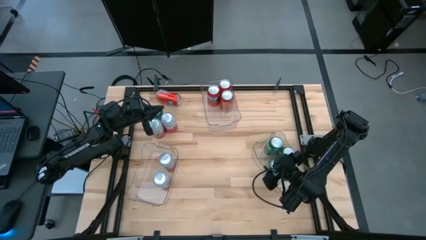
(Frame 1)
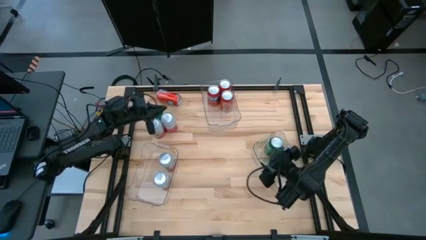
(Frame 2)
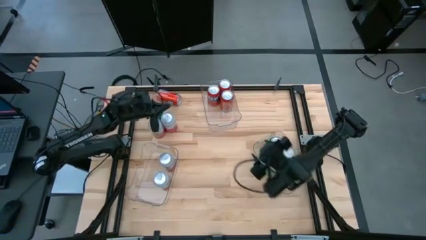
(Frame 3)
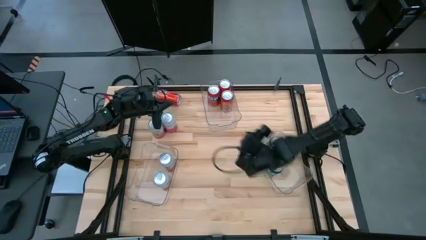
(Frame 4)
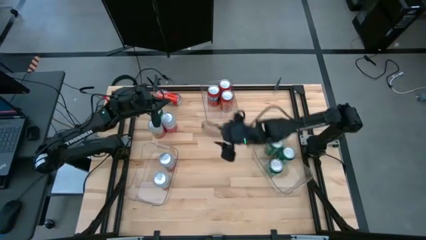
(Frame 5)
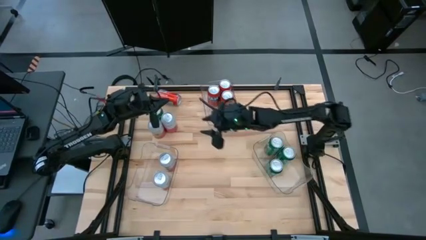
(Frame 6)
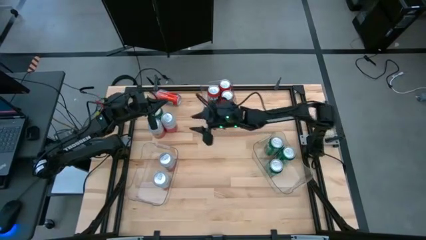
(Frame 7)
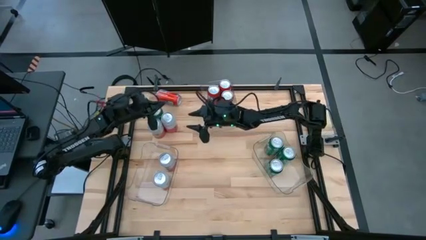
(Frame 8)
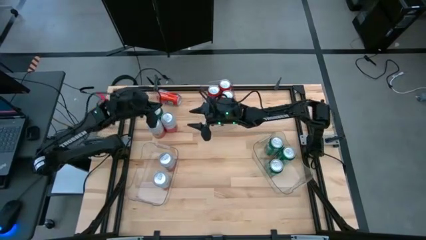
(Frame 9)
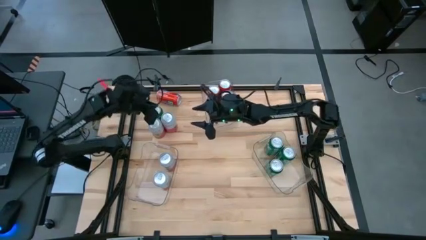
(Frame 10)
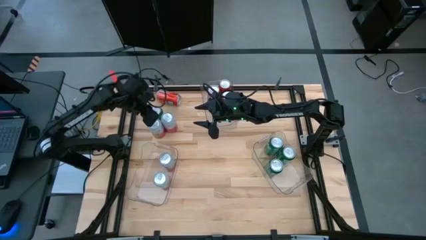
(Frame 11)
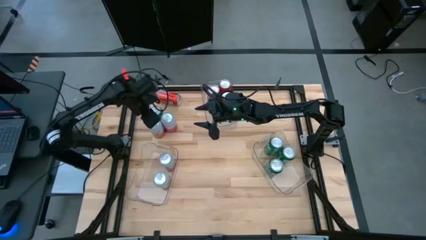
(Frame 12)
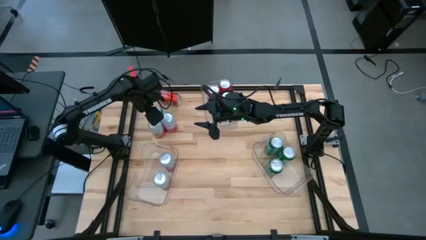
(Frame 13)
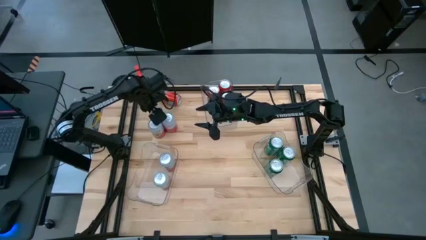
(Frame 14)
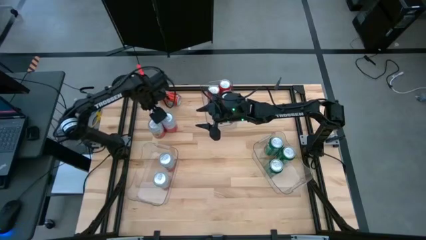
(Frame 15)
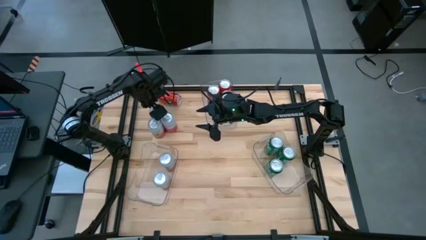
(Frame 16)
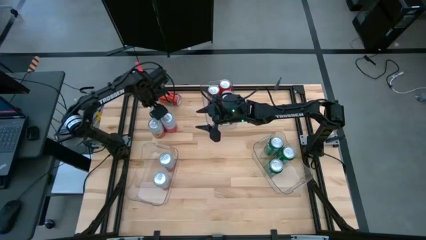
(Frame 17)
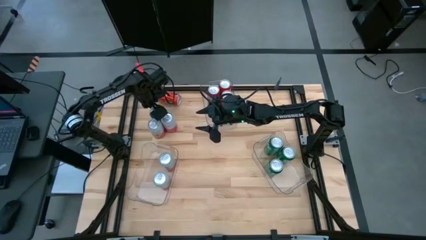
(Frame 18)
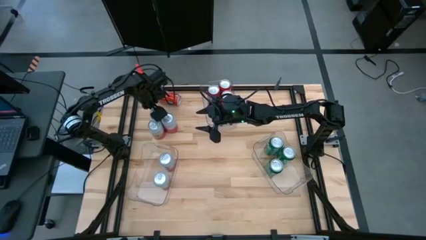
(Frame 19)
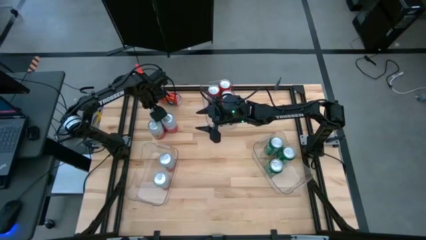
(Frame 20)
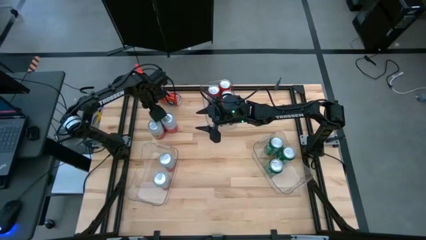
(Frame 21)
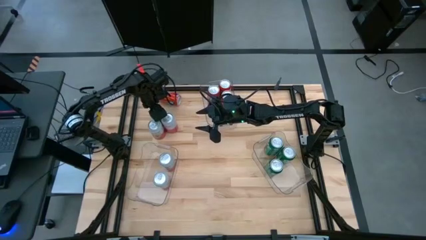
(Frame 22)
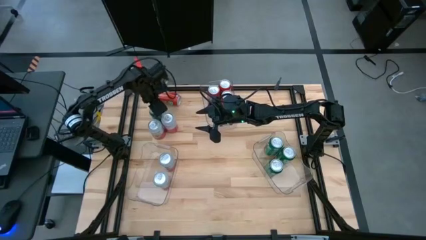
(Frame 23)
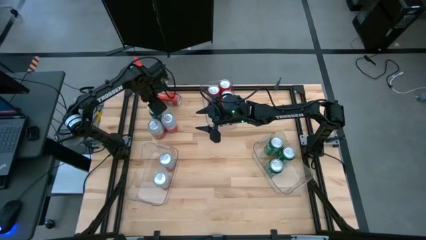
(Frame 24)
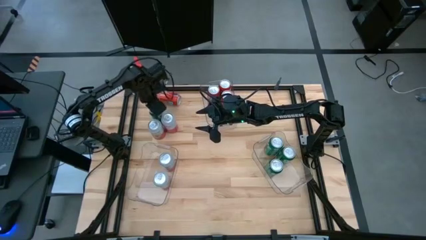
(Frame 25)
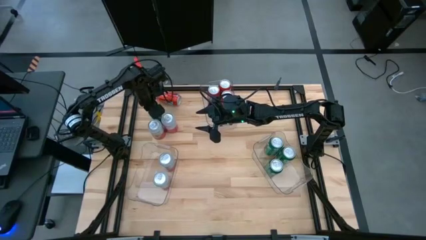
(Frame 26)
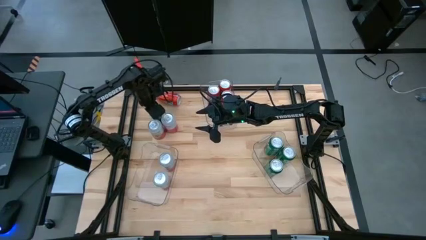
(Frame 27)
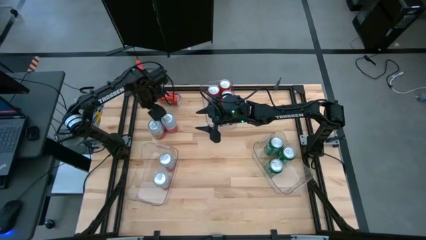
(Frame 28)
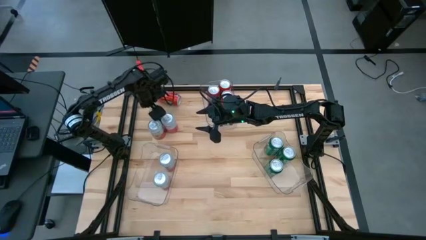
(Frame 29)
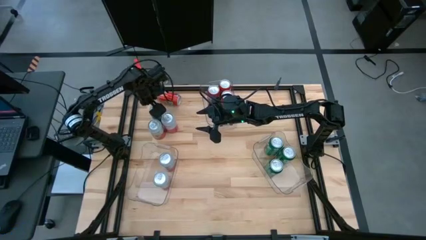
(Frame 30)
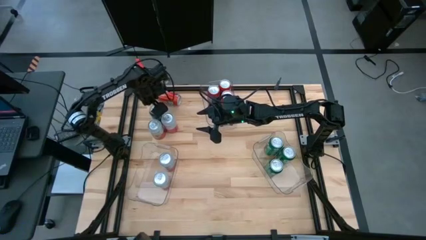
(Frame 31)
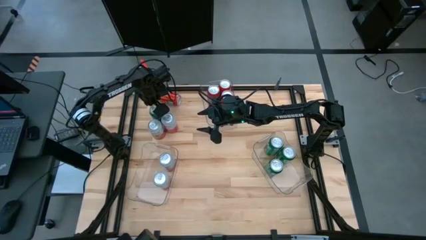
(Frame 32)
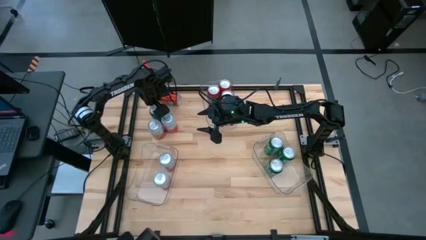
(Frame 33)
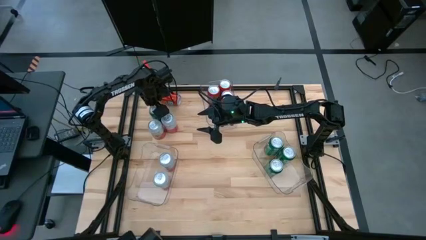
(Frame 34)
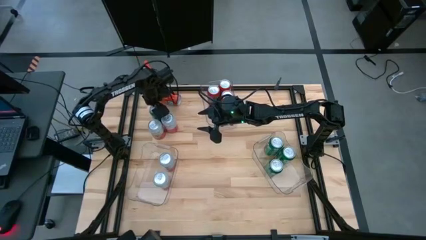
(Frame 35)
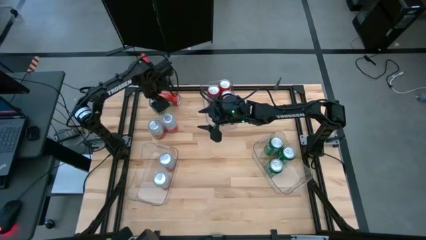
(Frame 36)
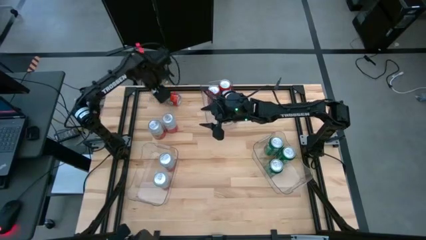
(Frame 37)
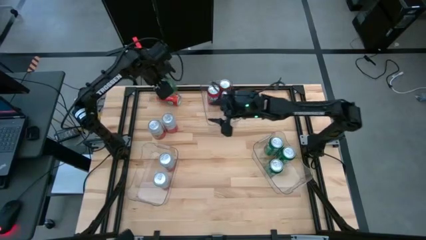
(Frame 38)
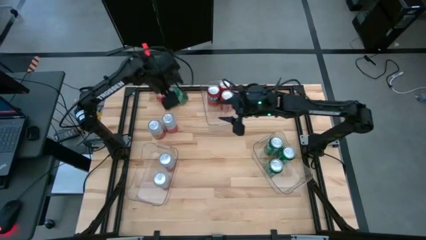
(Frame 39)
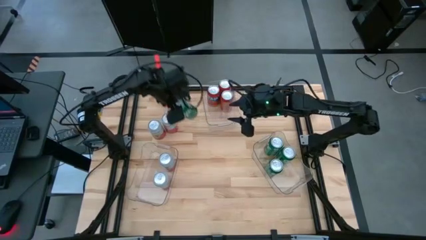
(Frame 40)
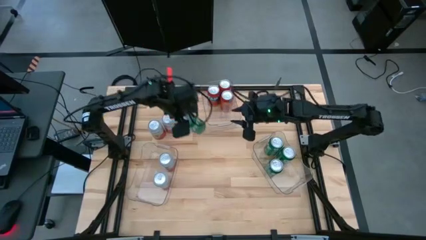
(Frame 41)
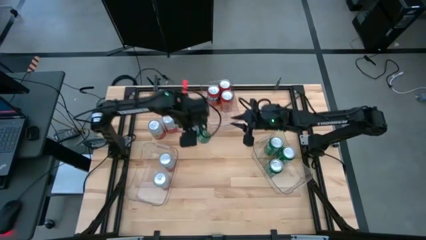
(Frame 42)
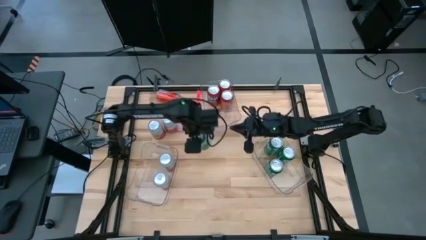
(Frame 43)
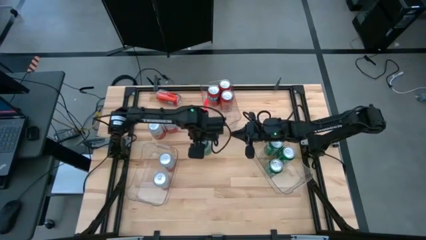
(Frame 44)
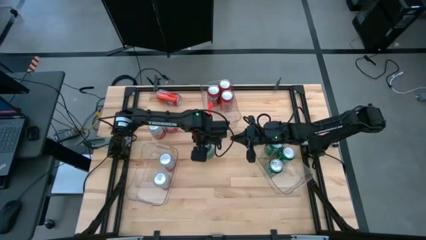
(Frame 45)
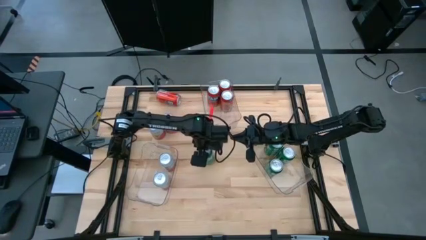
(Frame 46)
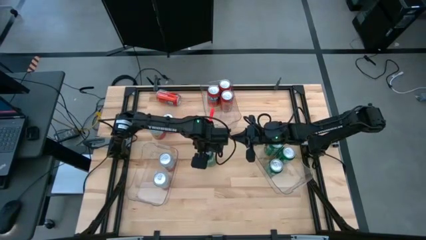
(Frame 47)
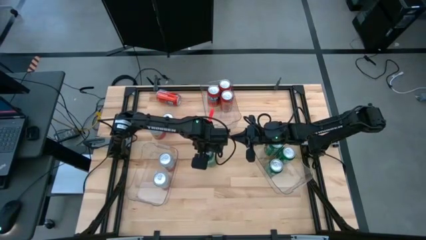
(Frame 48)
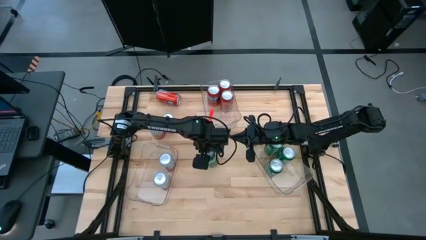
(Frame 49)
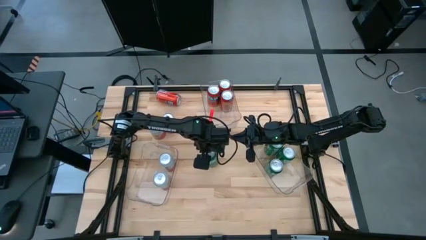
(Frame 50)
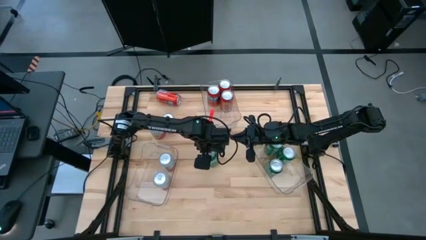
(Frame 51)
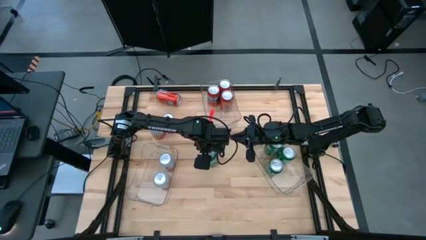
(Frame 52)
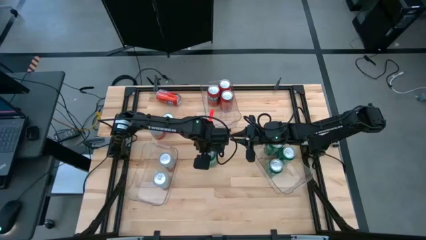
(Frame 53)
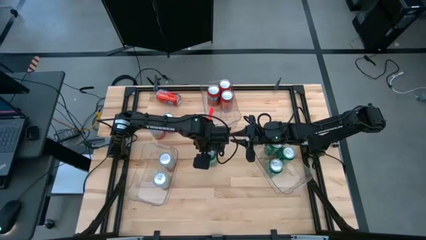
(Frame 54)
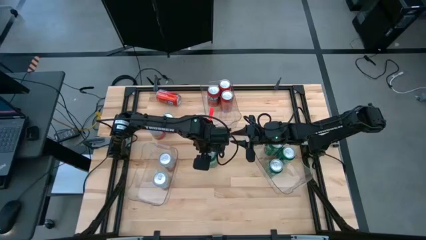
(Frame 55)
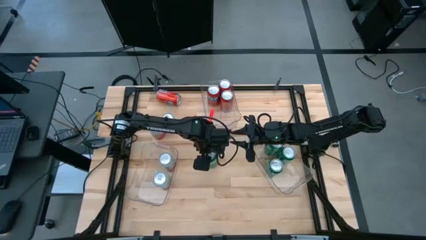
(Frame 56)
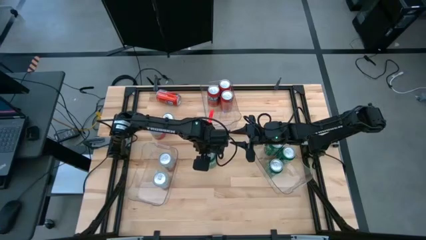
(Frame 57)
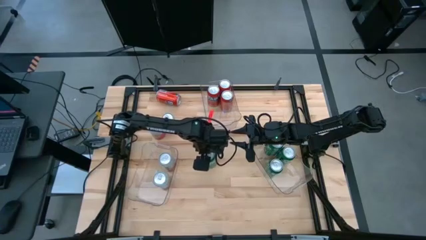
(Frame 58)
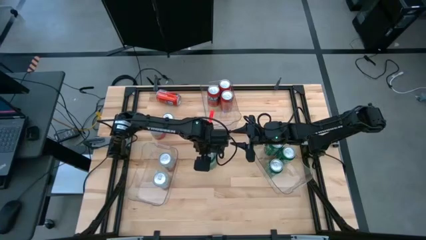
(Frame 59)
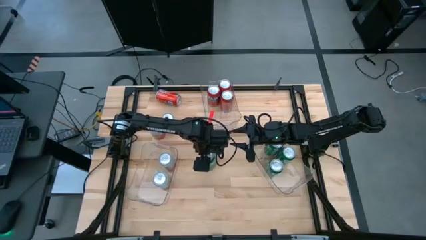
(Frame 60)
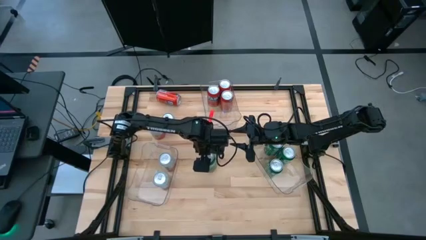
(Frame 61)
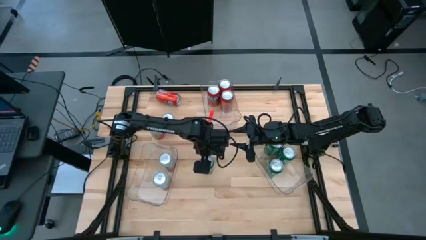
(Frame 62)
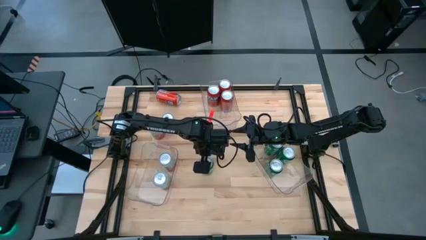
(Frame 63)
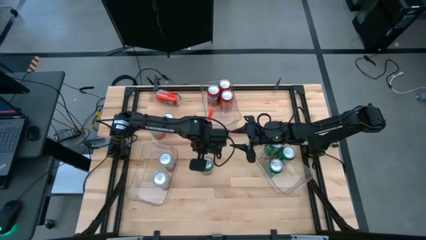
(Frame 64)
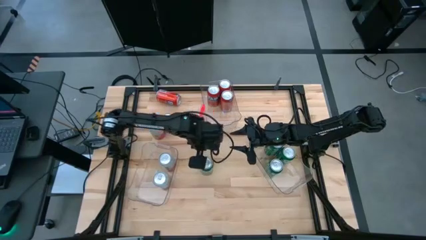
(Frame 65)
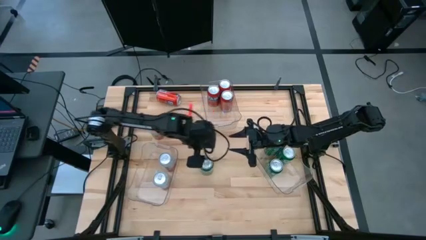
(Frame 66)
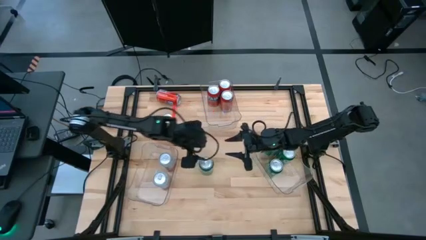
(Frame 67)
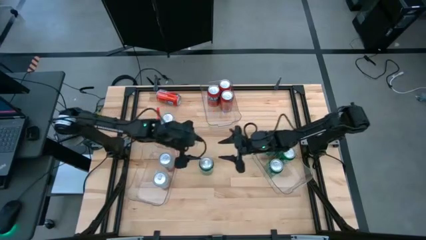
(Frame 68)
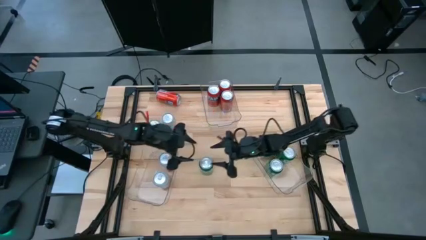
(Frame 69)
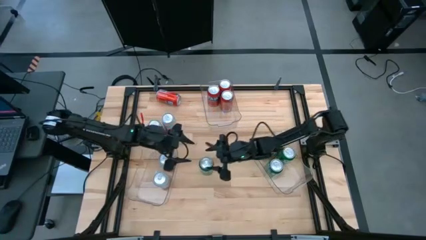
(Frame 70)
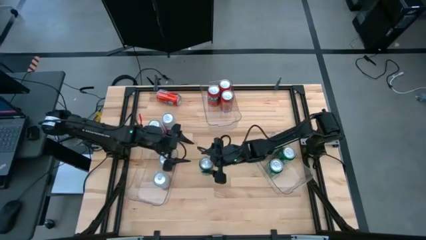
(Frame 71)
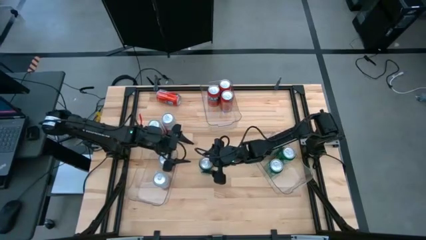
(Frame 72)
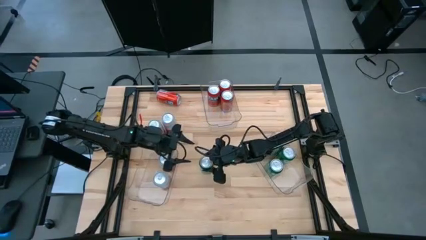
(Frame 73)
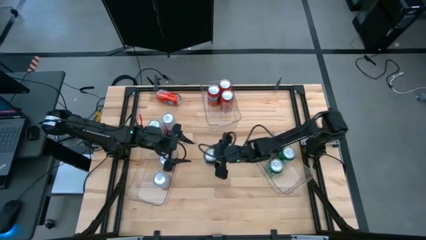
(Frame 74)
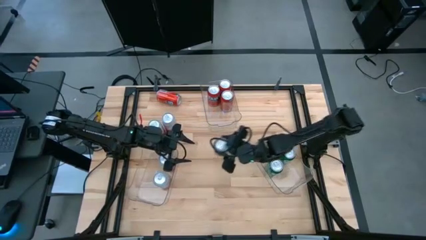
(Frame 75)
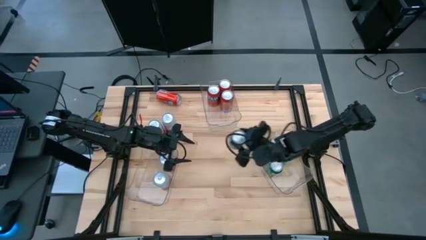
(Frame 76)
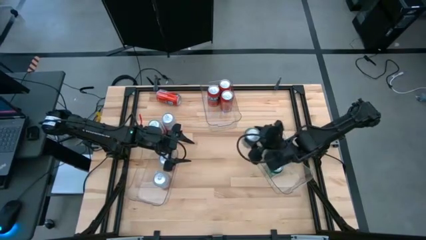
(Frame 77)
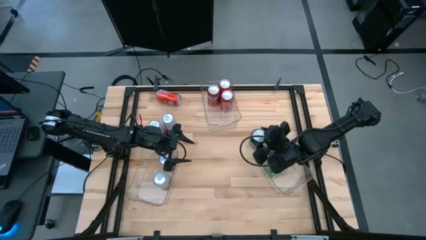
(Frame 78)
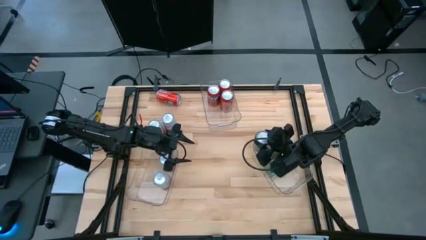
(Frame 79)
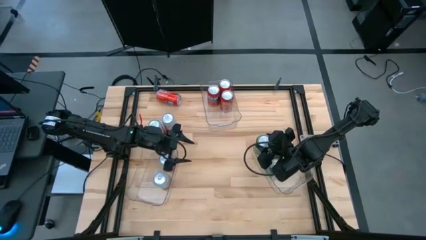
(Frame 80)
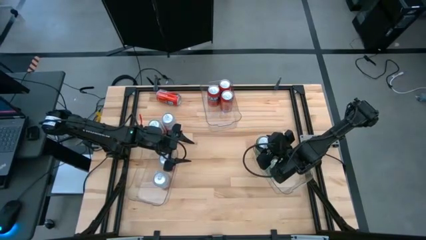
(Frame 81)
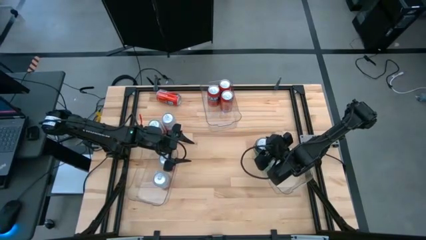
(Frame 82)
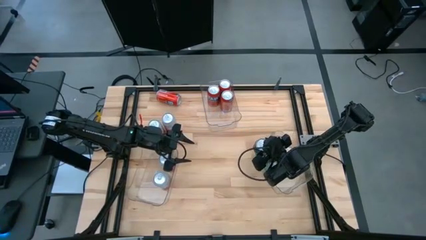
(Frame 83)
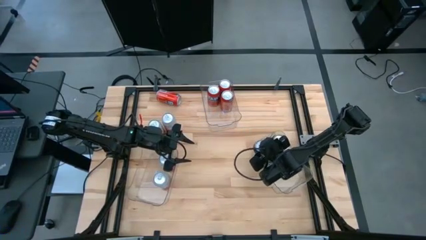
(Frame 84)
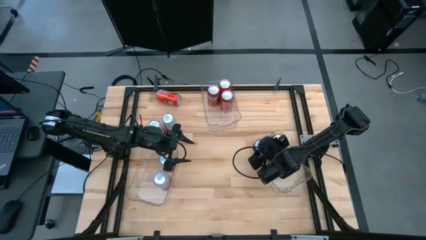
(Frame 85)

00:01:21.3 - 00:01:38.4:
Task: Sort soda cans
Put the green soda can into the bottom right transparent bin
